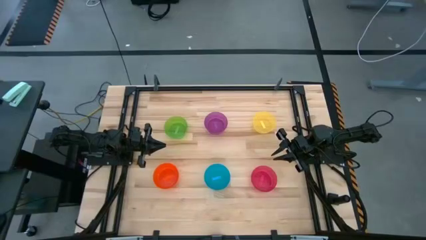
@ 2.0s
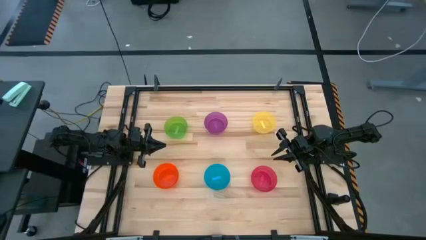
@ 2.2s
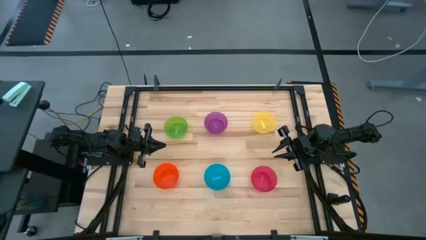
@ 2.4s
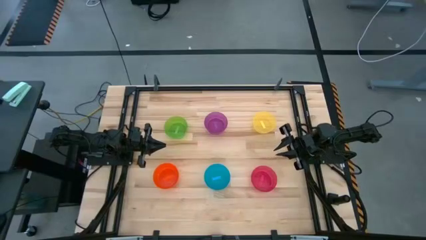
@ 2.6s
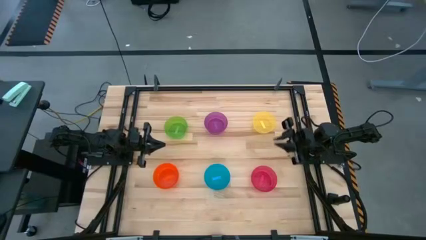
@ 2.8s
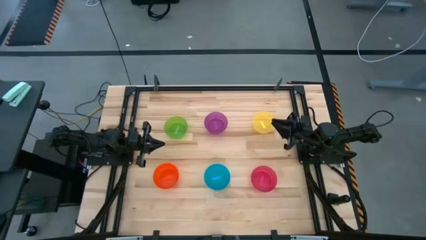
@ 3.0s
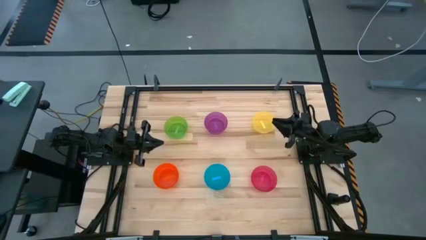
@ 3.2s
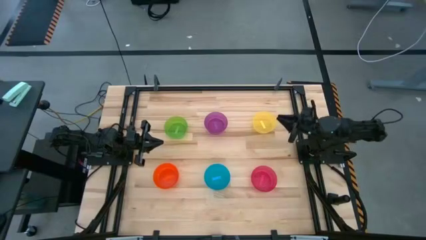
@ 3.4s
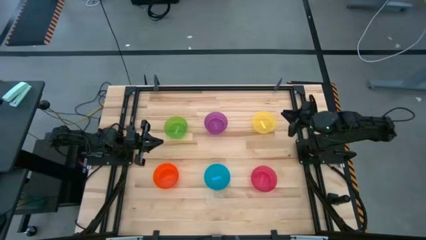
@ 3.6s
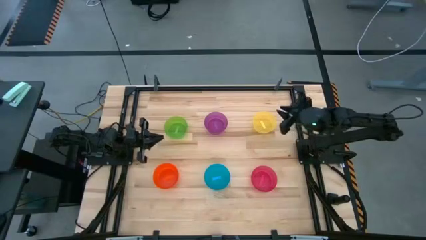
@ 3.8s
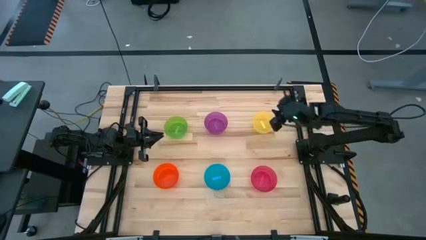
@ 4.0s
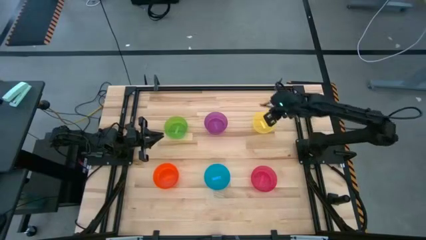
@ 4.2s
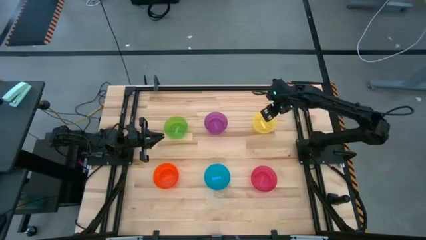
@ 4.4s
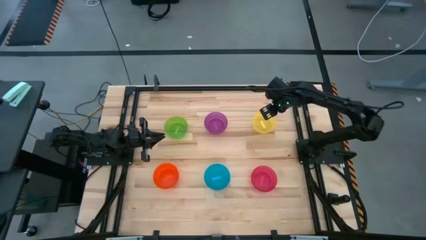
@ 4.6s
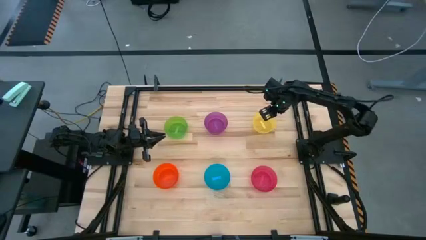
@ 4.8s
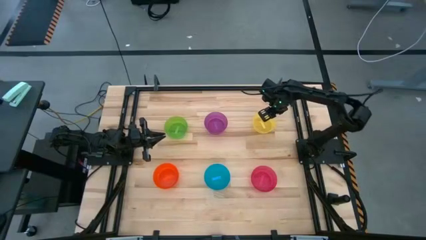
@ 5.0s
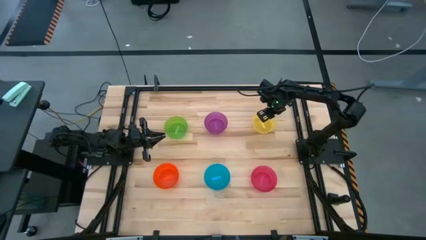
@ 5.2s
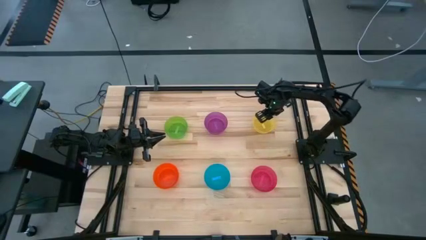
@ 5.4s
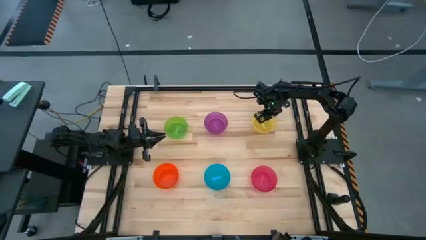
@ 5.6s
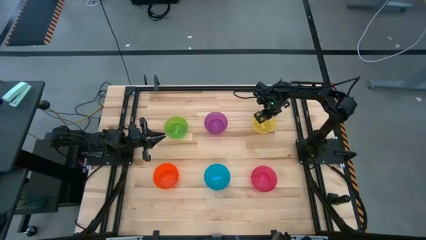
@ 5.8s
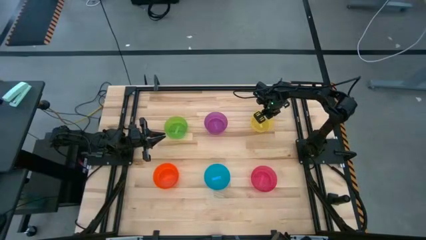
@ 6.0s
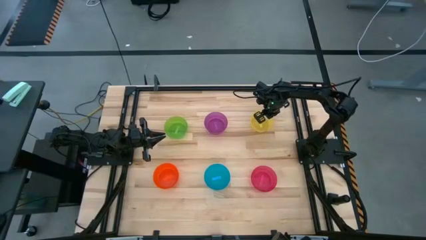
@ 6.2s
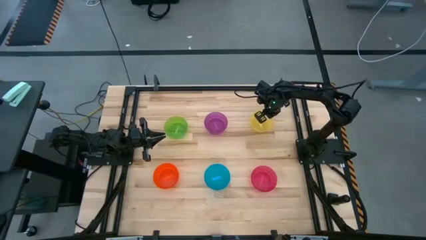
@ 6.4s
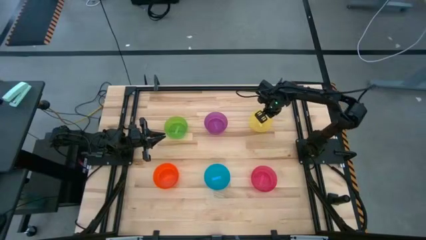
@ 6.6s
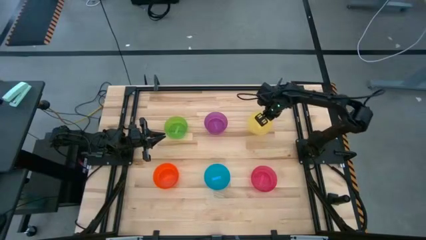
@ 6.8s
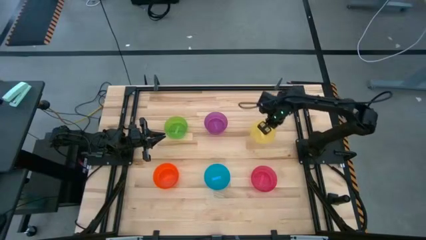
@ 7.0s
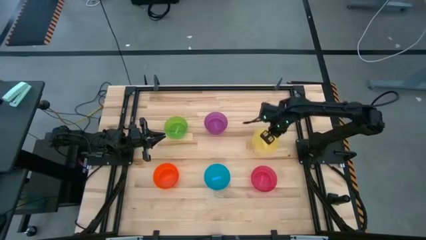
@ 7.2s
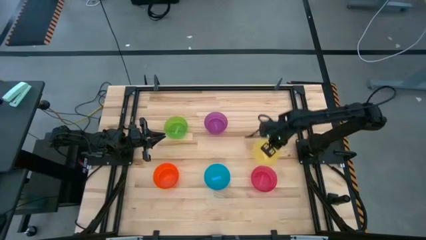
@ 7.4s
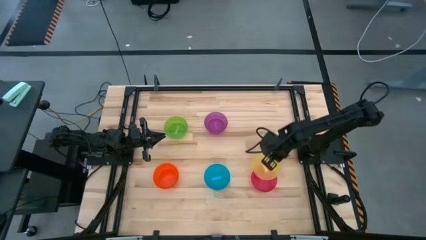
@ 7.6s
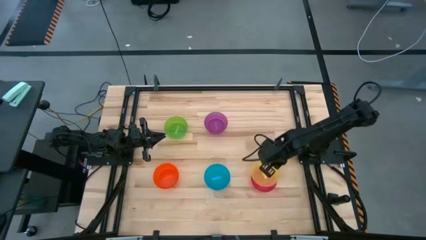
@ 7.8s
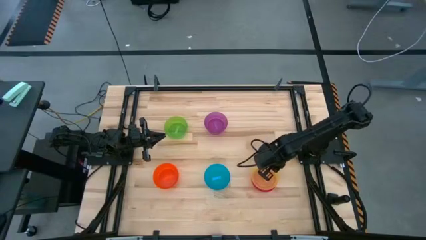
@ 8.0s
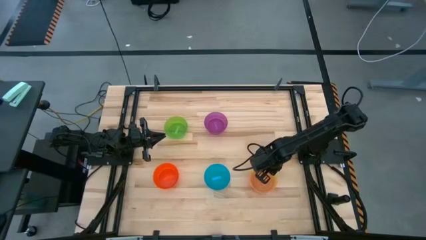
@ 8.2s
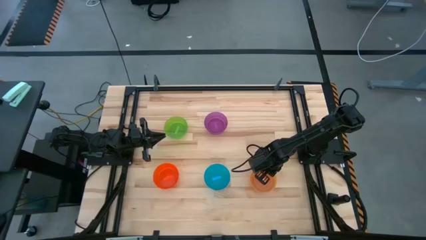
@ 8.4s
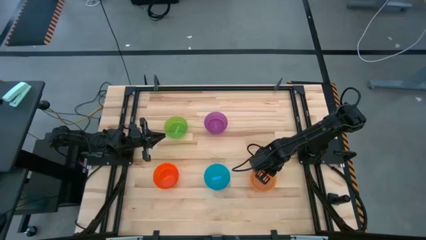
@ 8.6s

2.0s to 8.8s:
Task: Nest bowls inside each other
Stack the yellow bowl on top of the red bowl

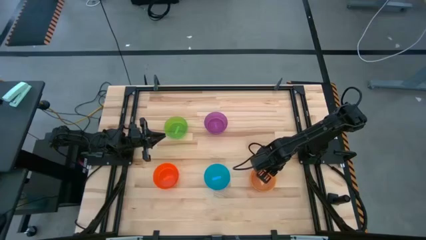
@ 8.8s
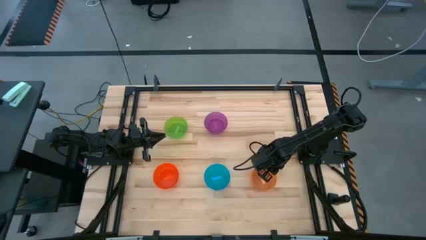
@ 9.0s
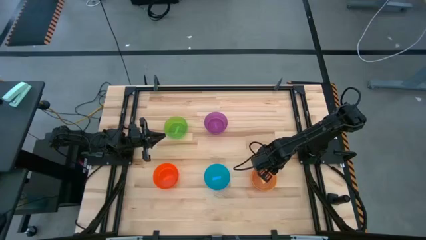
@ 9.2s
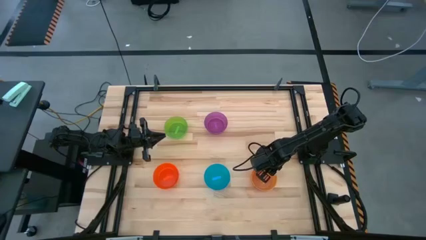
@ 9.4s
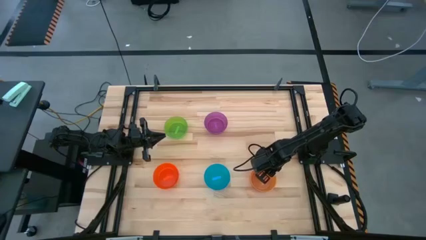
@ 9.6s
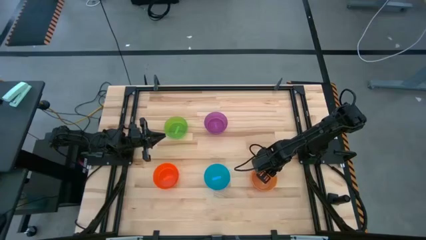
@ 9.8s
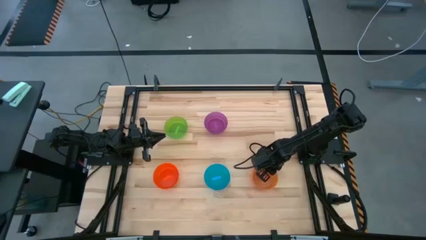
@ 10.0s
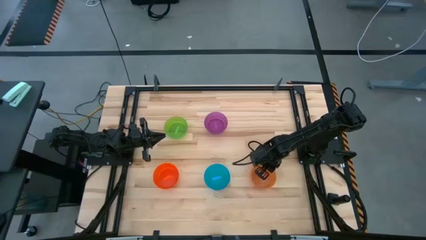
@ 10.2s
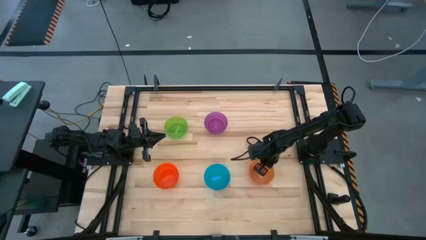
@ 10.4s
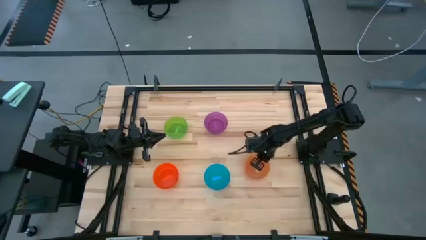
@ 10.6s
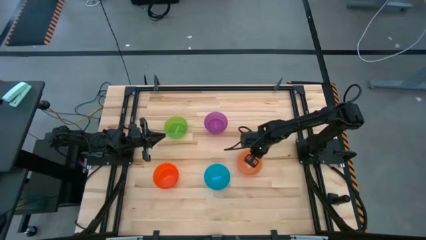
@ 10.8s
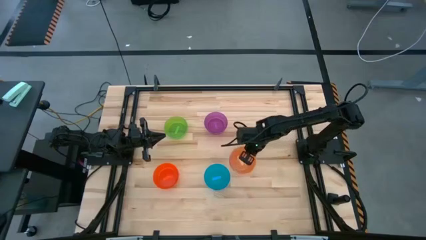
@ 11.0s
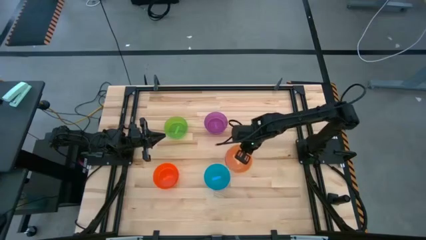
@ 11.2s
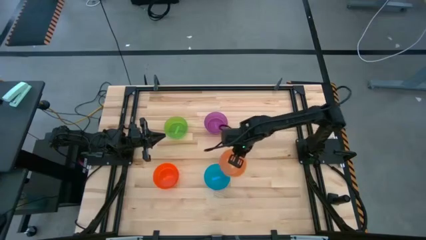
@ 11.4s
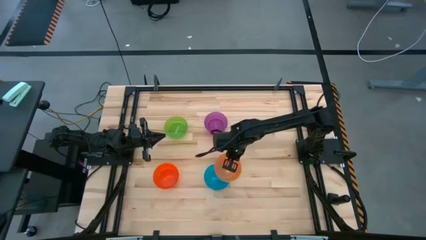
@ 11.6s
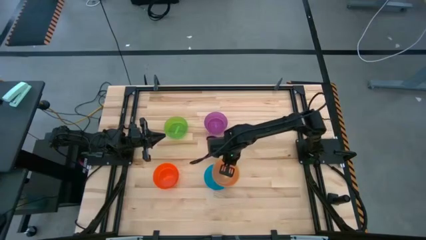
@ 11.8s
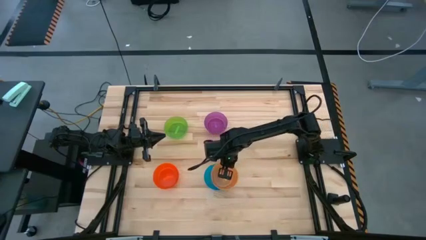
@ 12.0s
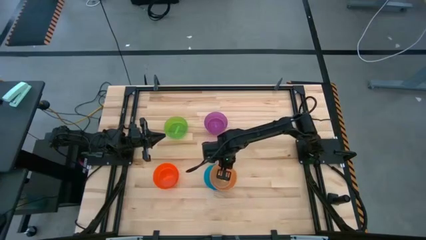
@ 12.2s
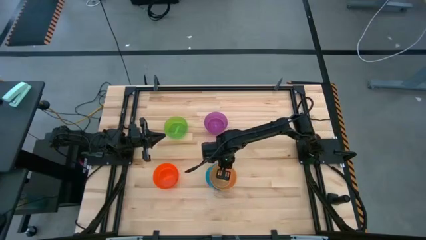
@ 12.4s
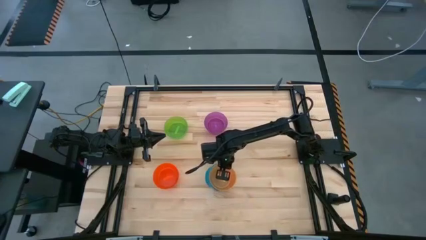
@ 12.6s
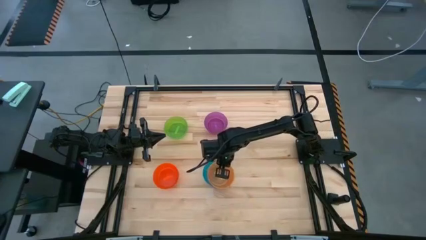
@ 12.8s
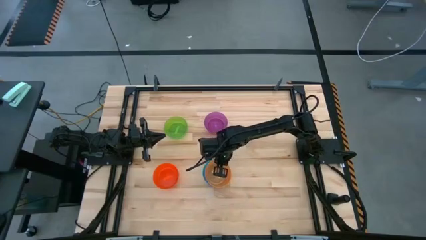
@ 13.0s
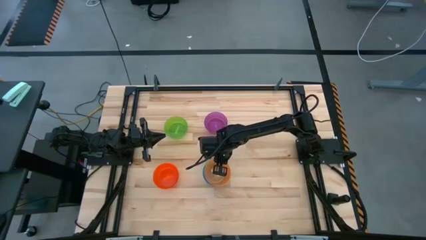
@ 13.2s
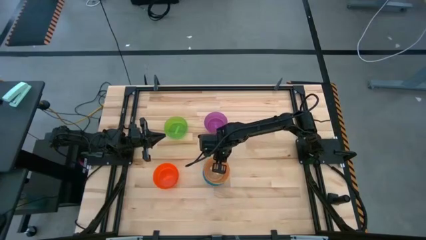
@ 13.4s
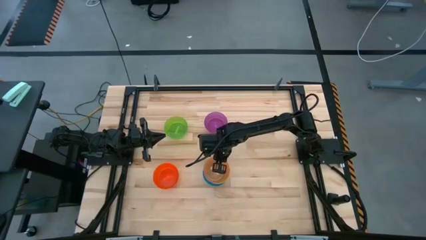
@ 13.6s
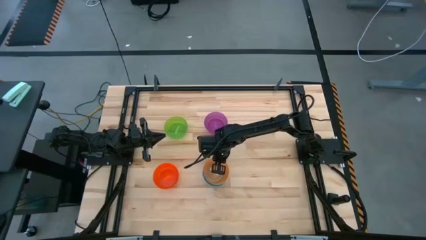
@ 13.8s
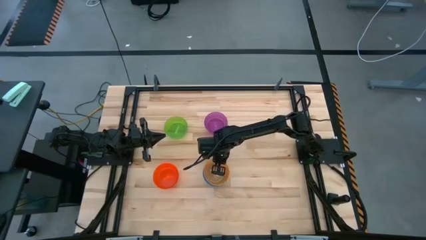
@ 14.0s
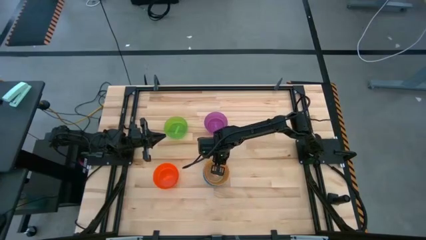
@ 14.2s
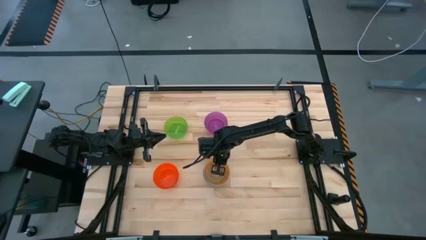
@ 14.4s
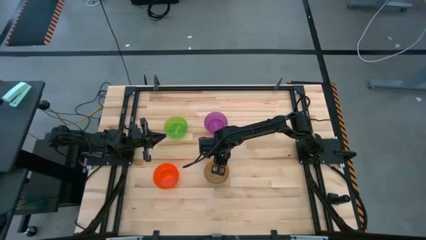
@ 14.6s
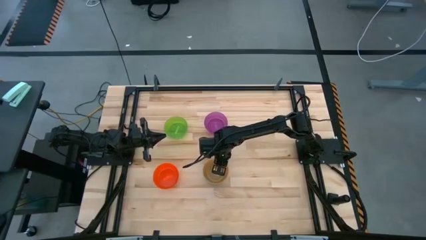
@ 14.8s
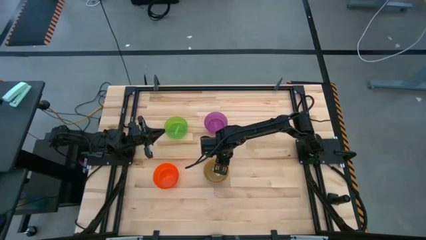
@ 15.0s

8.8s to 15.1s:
Stack the stacked bowls on top of the blue bowl

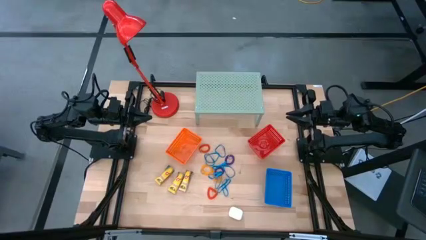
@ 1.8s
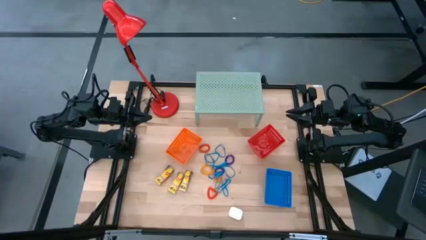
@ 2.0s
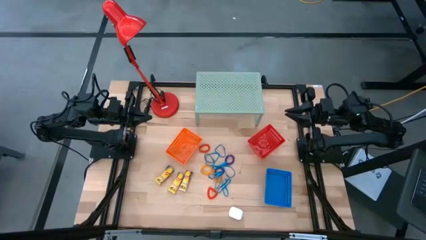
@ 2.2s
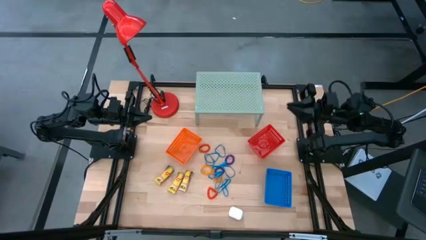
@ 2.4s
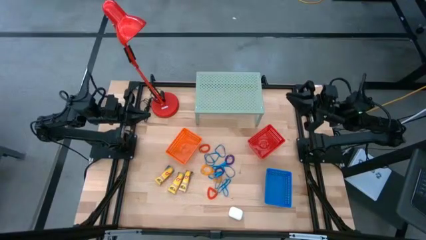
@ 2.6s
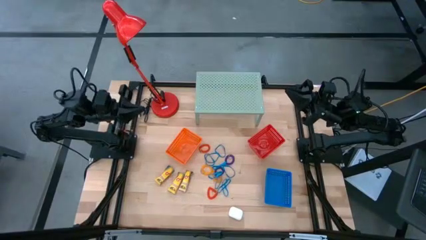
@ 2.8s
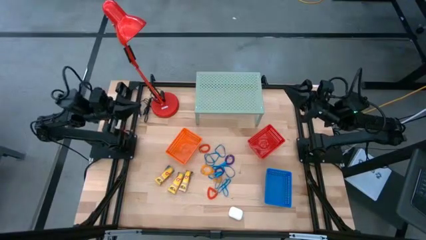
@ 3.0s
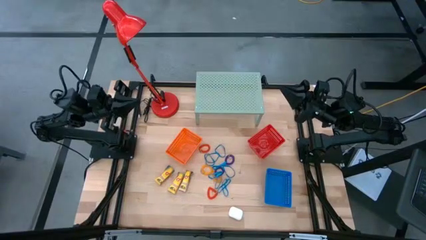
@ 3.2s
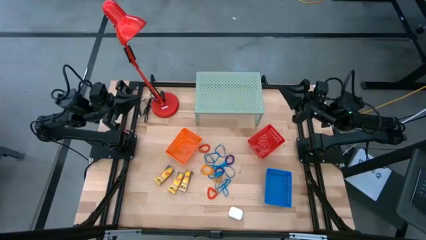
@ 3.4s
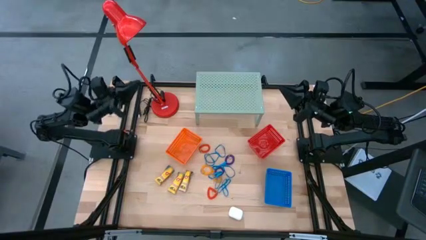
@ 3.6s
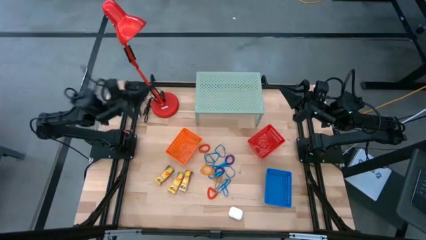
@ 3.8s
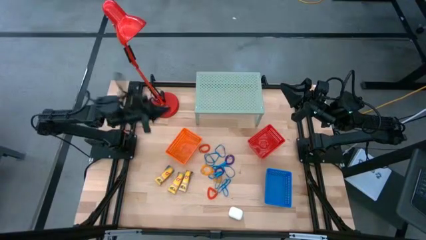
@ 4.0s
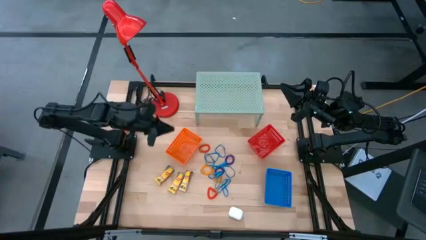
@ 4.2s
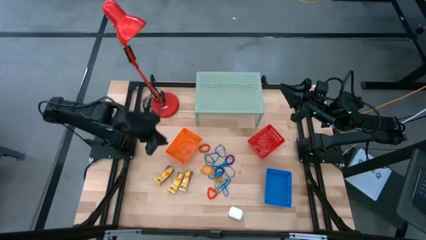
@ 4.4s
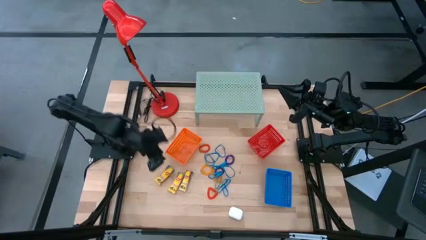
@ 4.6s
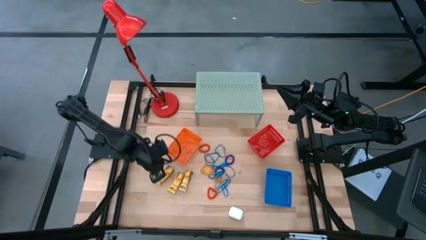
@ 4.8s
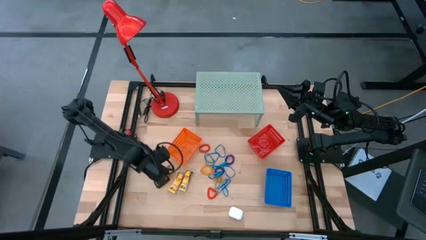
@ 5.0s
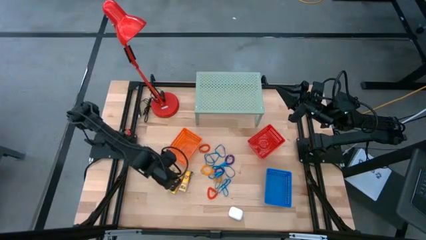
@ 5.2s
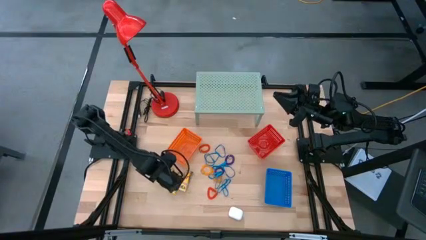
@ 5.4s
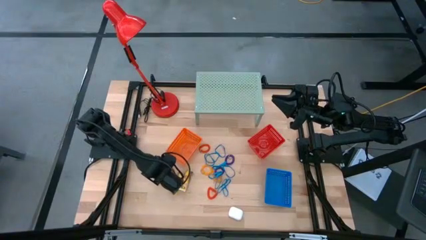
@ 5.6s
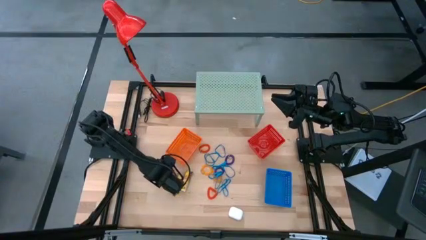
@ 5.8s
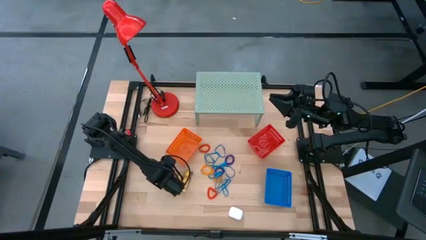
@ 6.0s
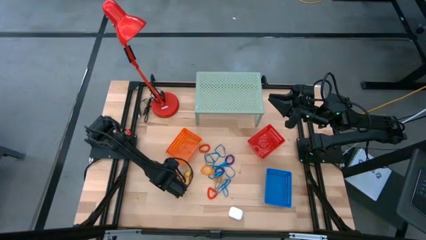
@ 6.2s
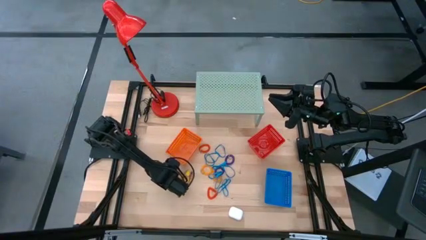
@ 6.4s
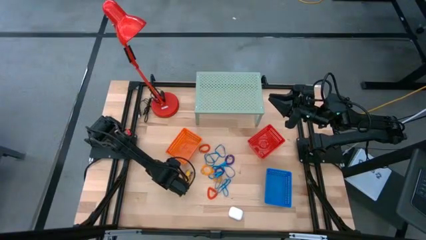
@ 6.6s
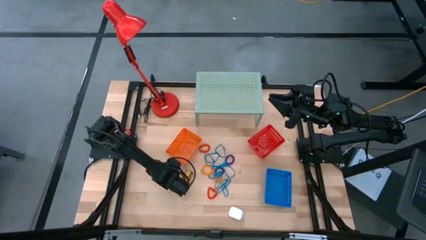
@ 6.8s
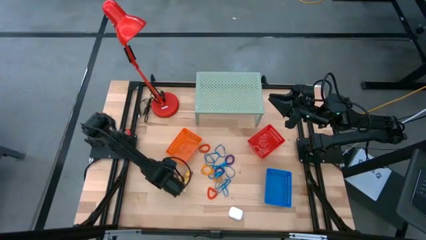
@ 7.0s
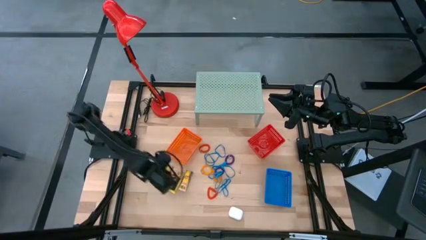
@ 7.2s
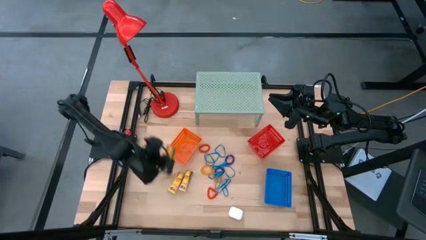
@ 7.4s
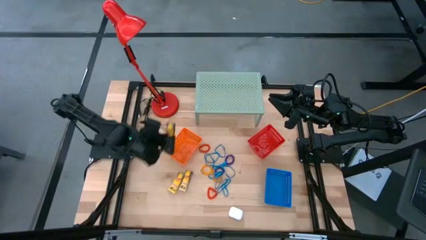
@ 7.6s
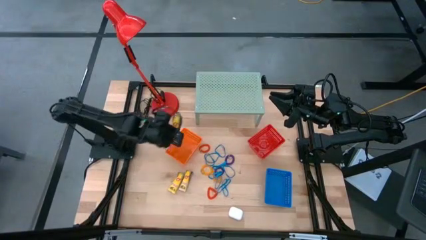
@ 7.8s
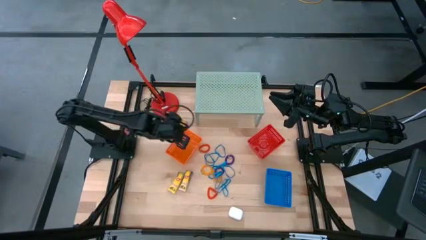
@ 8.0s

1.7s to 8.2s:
Task: Pick & Place Office Desk Supplies
Put the crayon box into the orange bin
